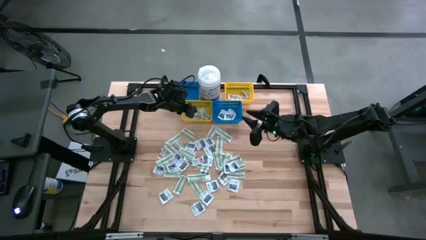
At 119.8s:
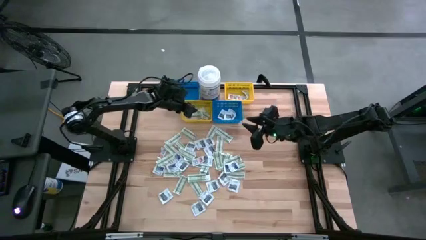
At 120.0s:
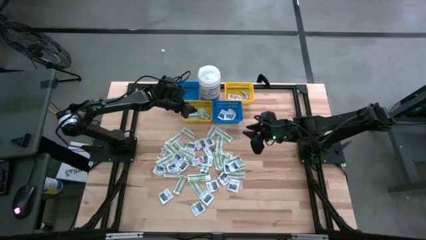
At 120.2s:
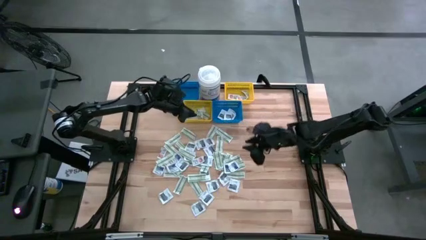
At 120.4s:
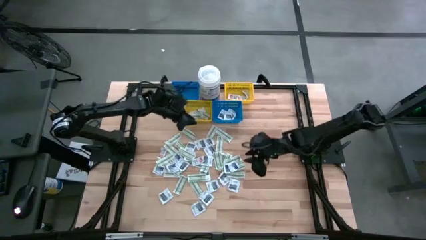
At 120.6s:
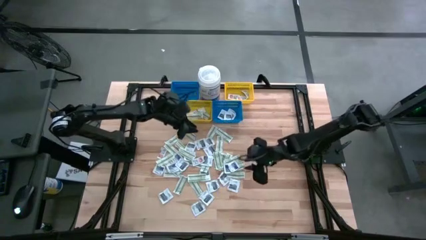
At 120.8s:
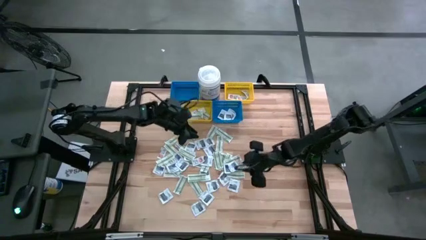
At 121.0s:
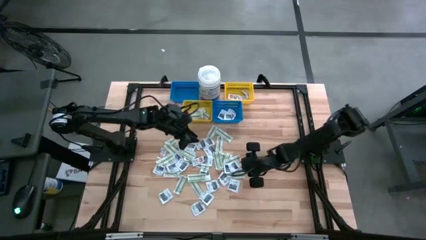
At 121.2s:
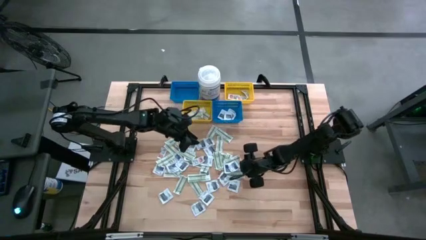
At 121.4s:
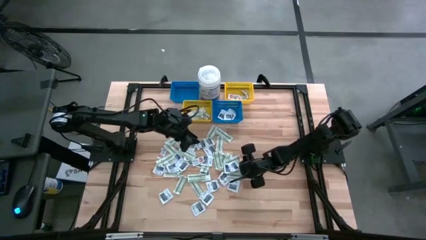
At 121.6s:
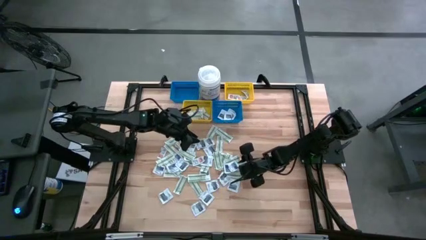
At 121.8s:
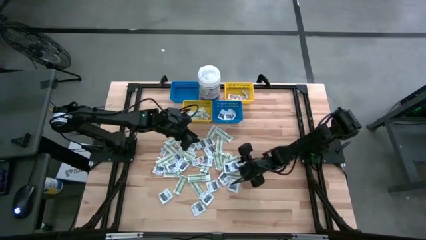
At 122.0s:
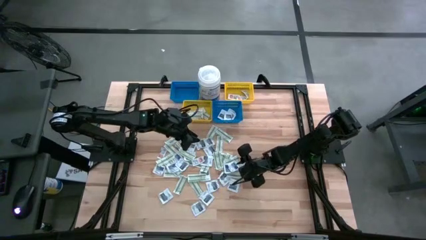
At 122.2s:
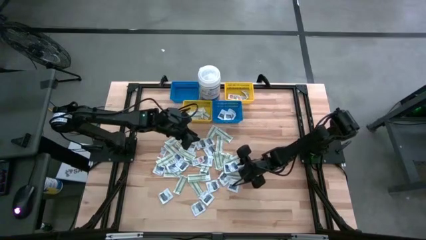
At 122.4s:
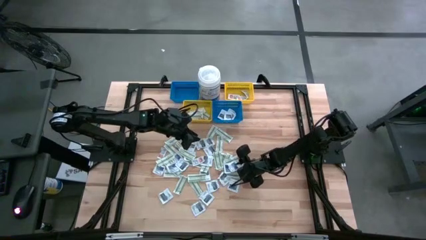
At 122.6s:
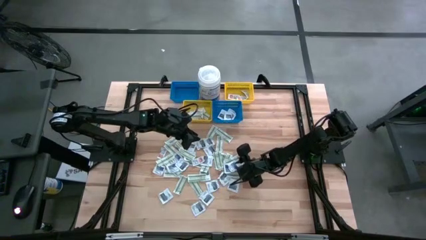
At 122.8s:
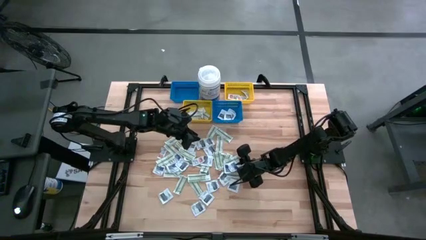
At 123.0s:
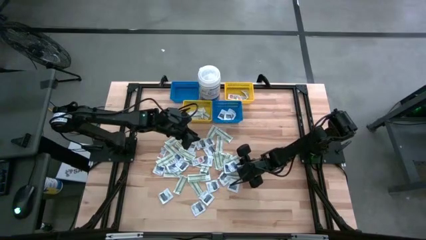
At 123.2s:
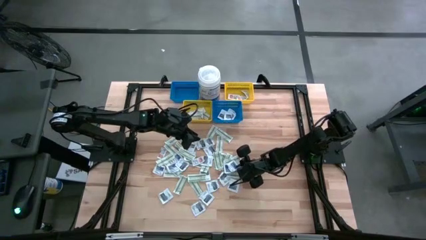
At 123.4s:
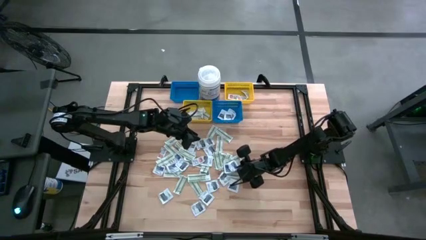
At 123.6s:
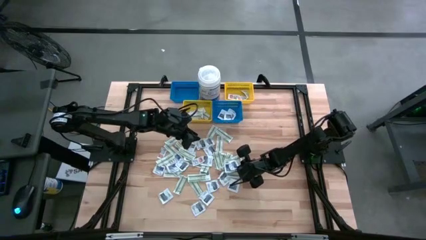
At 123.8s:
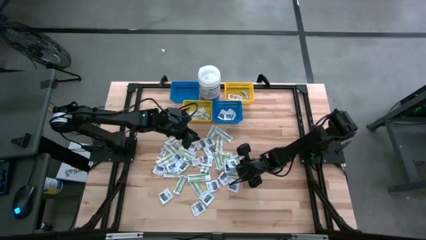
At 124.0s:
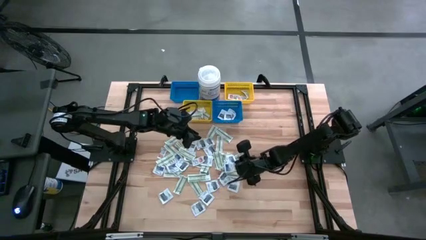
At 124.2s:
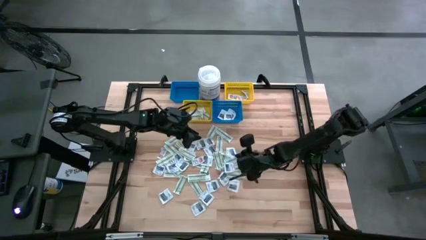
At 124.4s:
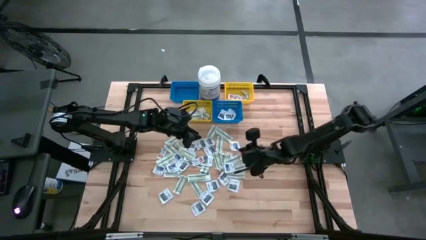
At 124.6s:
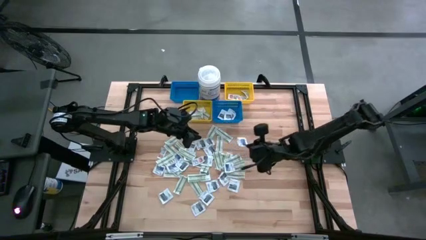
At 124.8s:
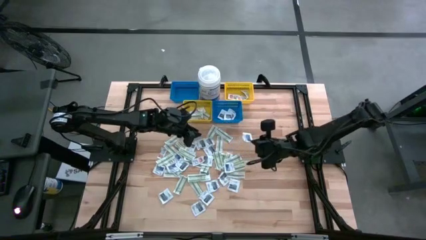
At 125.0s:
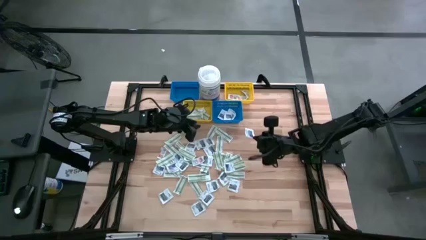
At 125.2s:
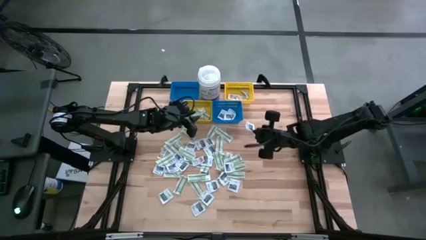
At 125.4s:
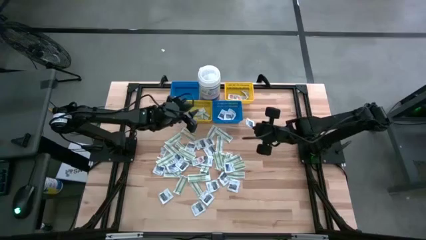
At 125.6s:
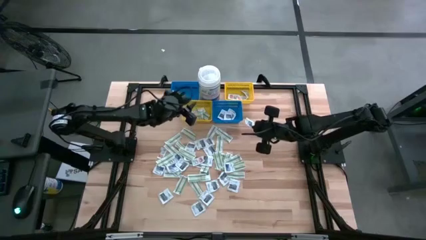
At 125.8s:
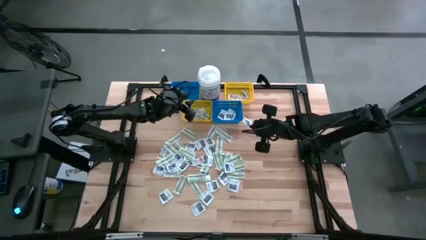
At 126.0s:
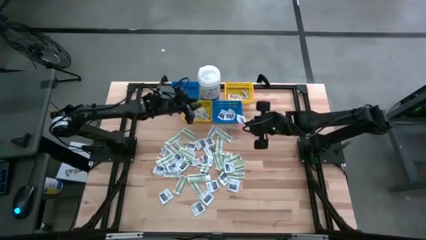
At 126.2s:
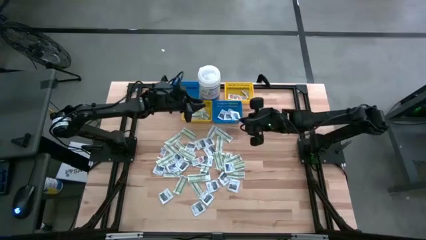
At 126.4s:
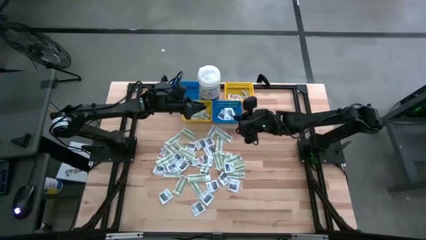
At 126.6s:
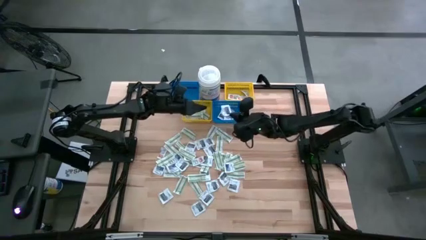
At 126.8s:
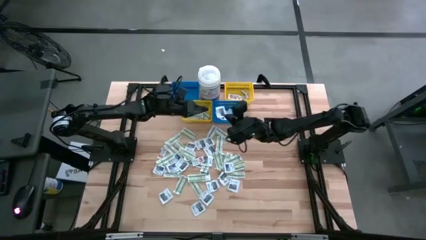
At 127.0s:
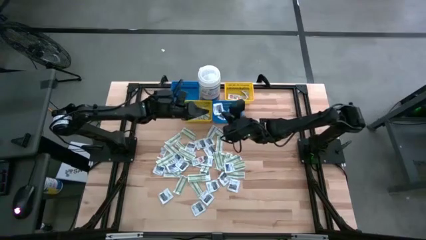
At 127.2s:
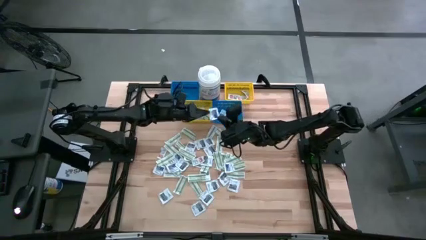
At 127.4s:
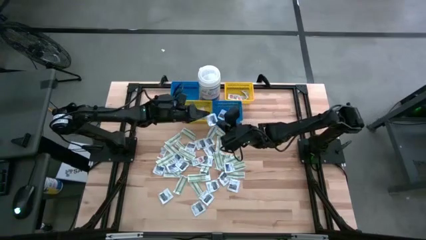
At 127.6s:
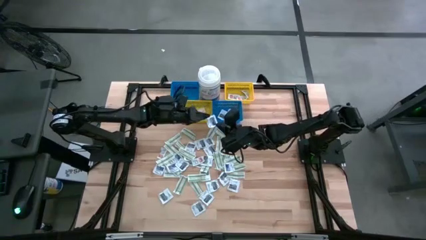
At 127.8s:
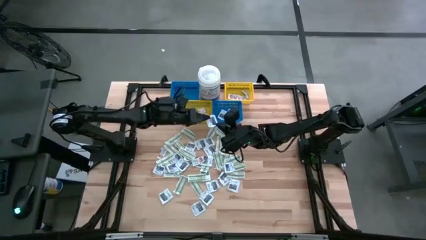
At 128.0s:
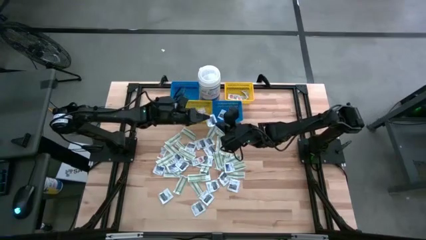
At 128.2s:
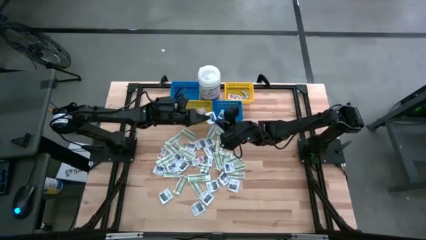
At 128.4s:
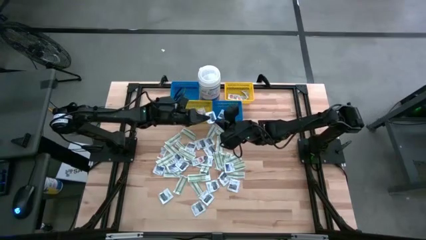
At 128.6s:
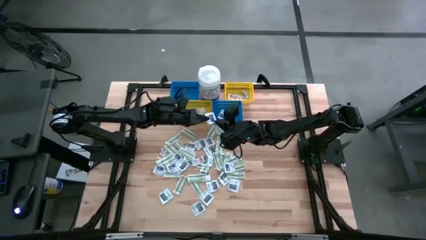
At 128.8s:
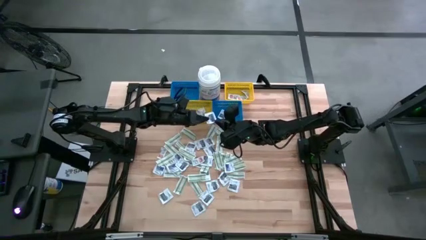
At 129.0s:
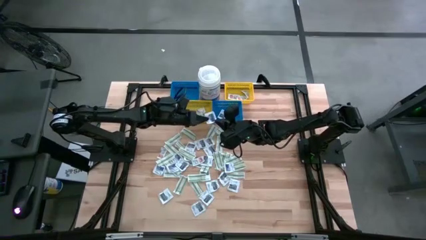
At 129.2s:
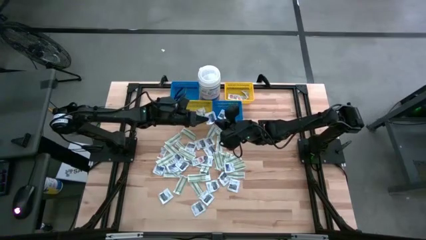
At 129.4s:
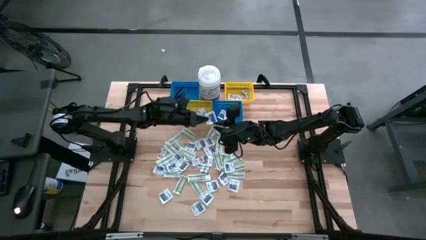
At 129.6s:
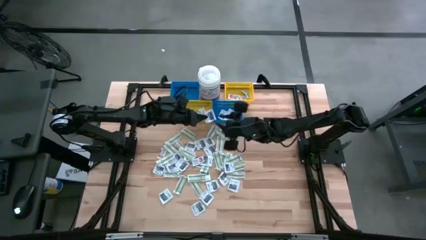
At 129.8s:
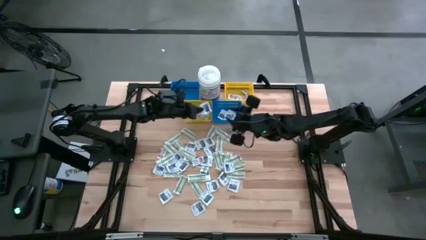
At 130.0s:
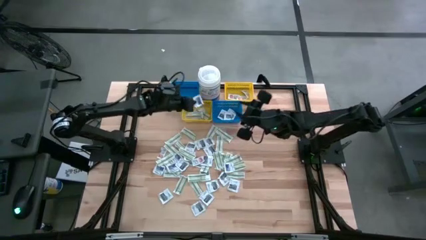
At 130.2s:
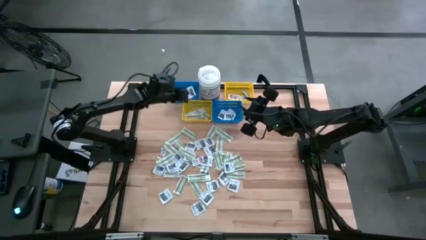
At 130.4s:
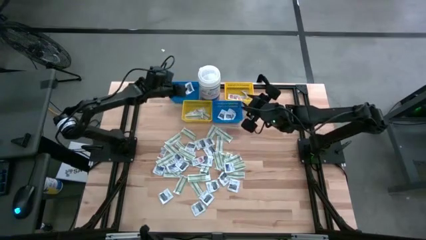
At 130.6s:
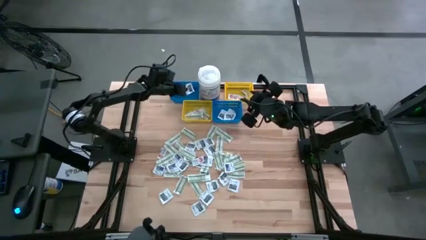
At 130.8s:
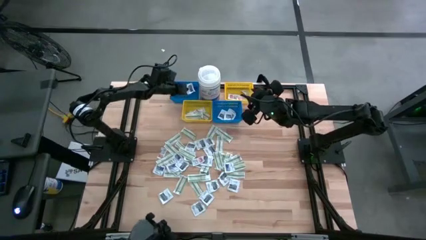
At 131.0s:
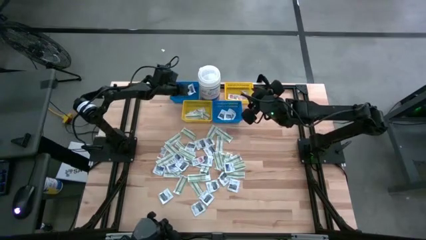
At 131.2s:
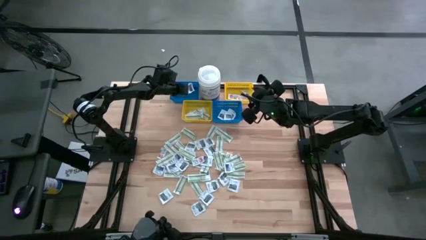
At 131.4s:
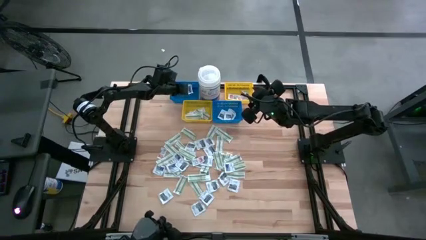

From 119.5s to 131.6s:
Task: Pick & Place First Aid Supplies
Put the blue alcohol pad into the left blue bin

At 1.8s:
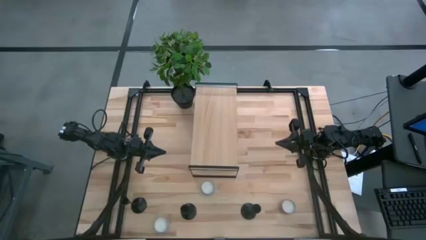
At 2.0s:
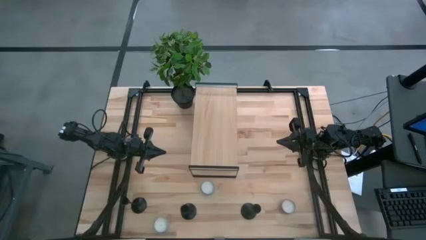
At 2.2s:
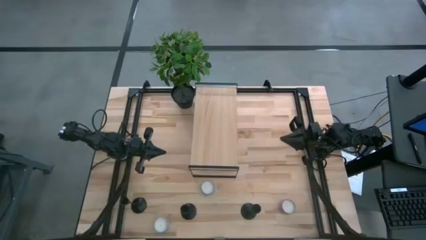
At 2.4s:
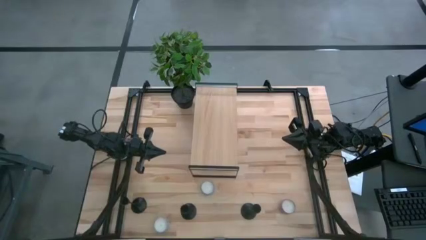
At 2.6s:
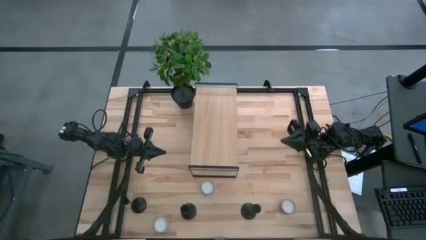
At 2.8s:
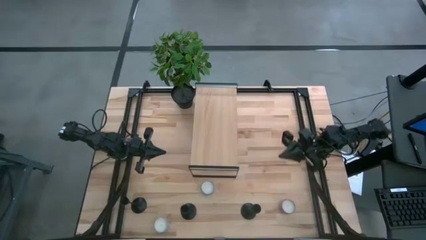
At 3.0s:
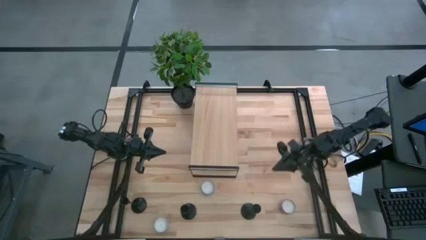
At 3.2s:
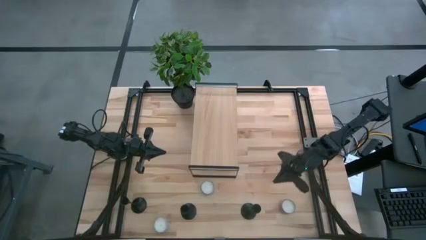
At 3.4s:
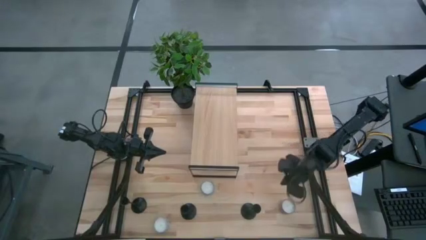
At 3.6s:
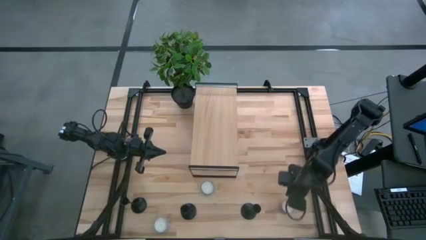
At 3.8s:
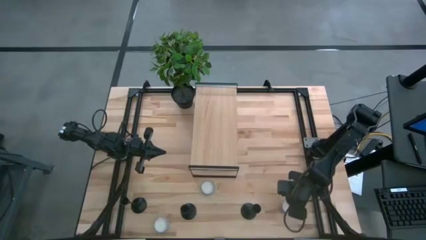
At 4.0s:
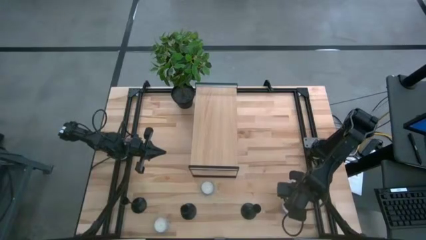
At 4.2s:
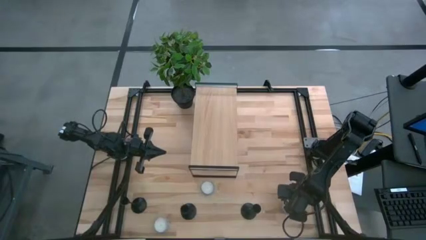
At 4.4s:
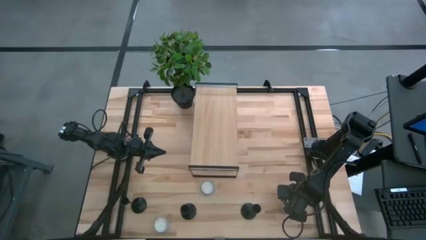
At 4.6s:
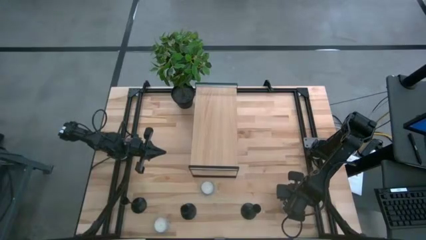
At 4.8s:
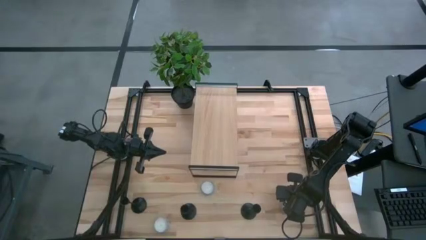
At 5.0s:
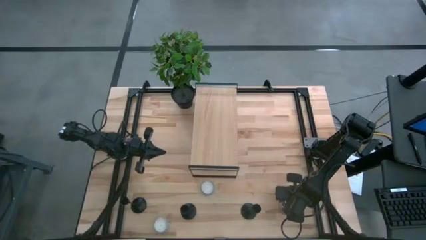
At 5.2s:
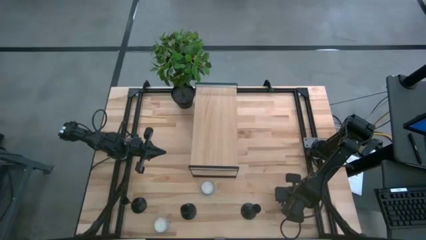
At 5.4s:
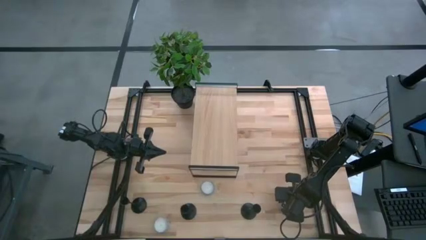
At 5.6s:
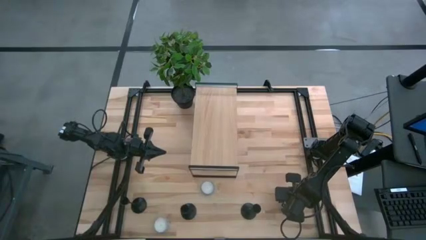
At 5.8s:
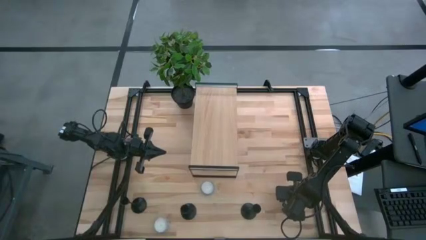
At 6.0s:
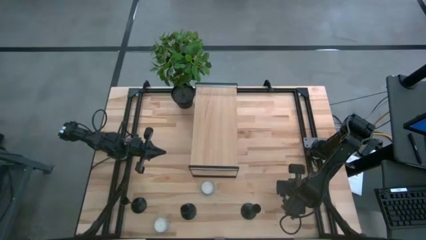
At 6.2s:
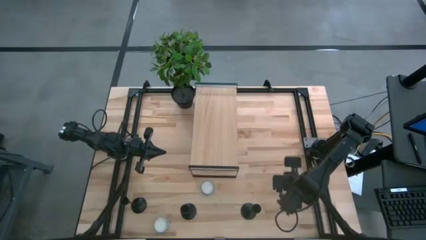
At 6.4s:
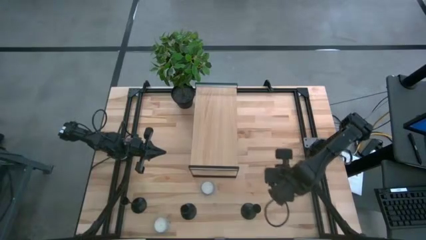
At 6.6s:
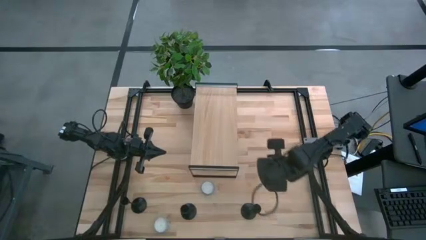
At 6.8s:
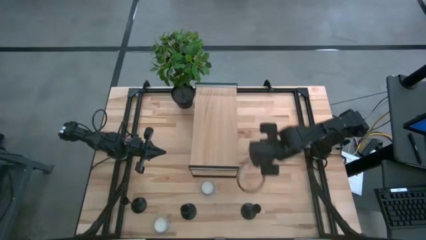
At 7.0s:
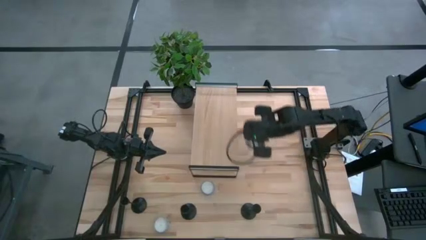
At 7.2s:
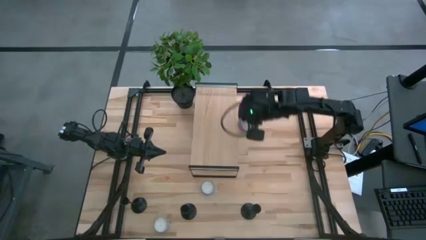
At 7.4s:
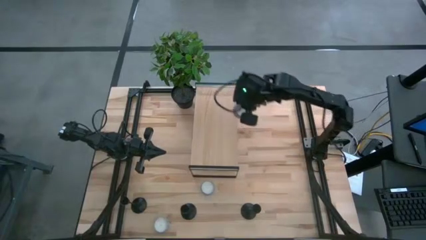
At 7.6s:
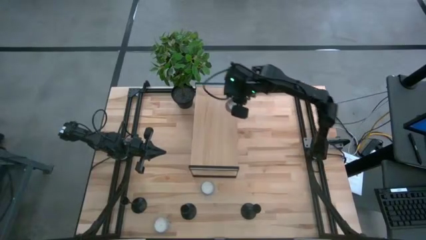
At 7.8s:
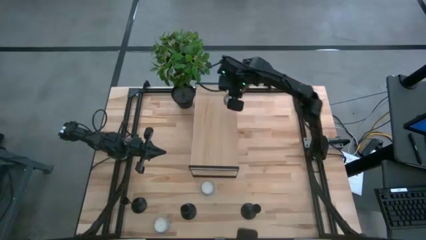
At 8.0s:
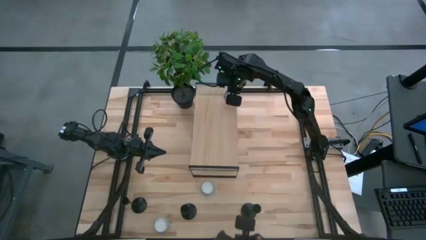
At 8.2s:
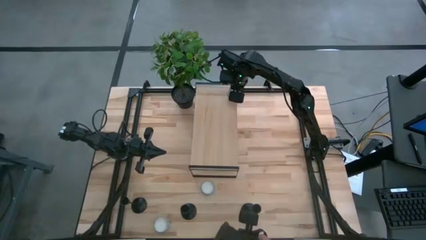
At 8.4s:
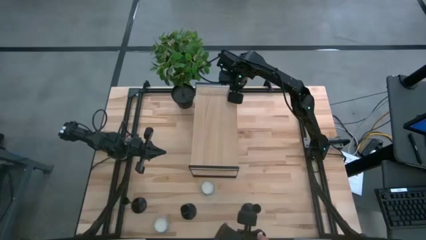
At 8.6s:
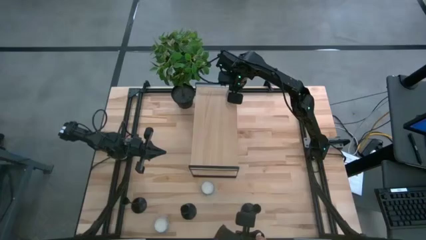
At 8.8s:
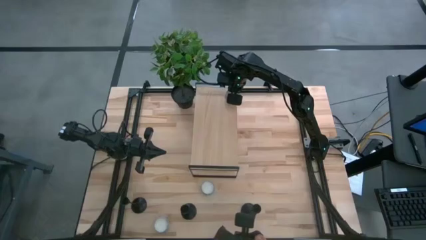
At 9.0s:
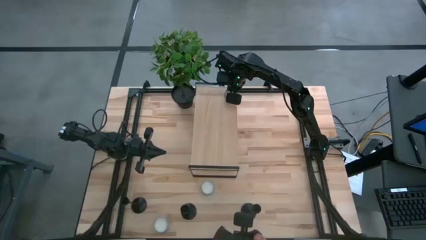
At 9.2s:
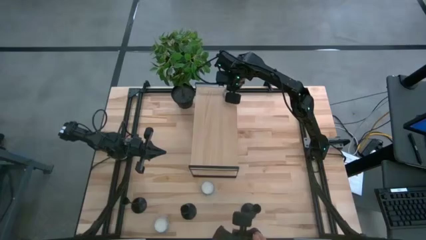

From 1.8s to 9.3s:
Task: Pick & Place candle stick holders
Put the right white candle on the shelf
